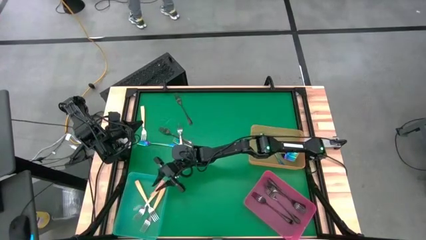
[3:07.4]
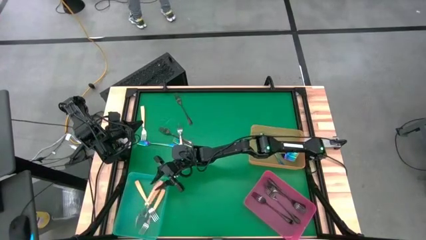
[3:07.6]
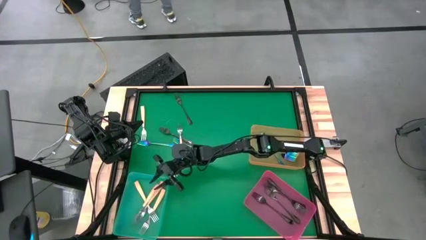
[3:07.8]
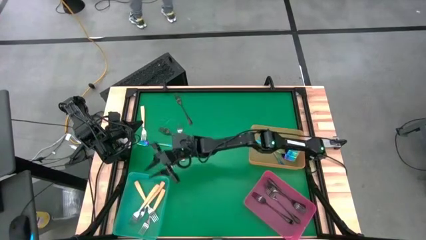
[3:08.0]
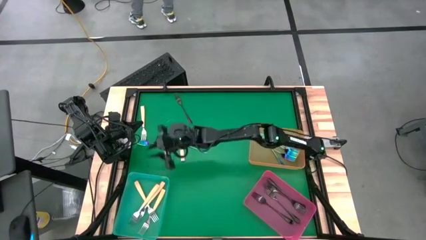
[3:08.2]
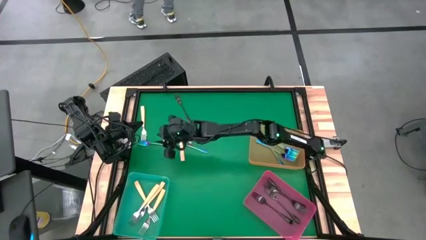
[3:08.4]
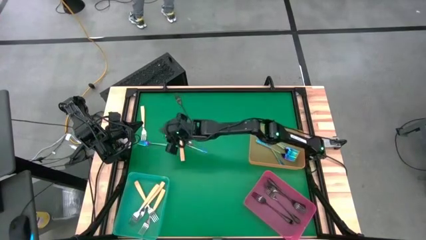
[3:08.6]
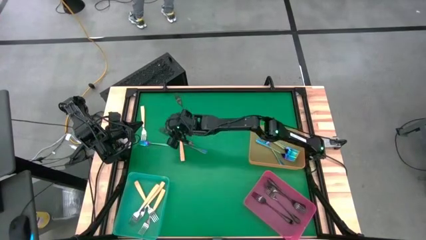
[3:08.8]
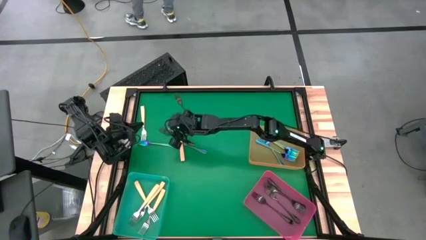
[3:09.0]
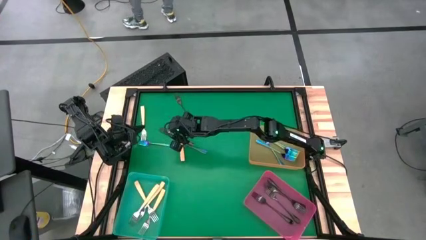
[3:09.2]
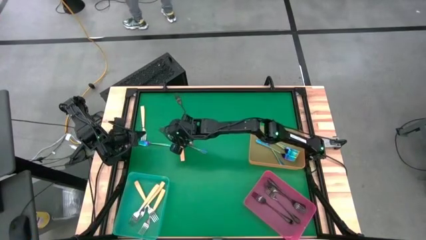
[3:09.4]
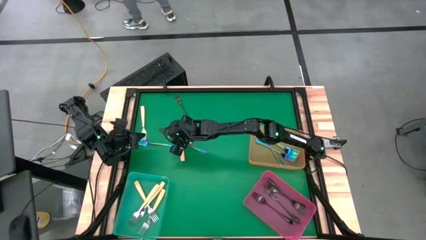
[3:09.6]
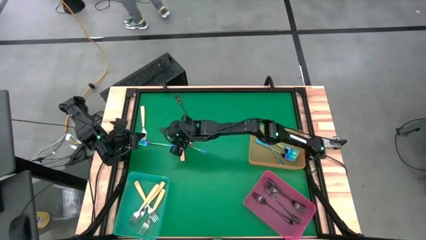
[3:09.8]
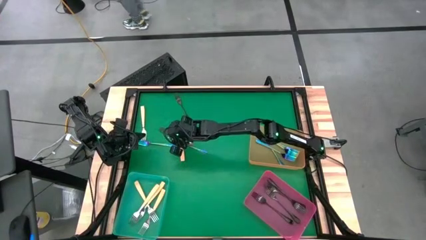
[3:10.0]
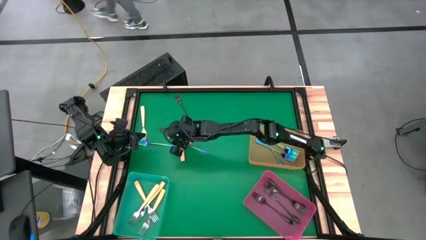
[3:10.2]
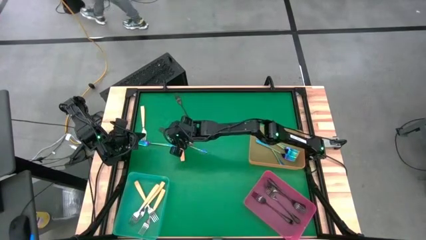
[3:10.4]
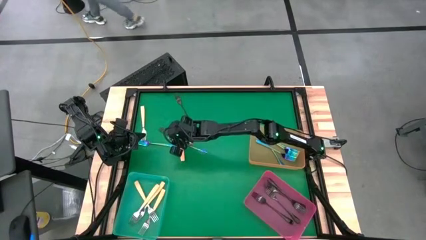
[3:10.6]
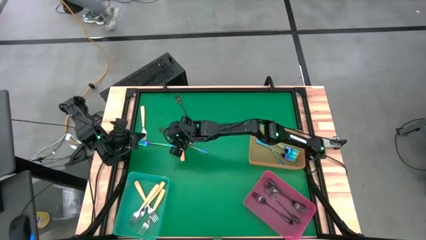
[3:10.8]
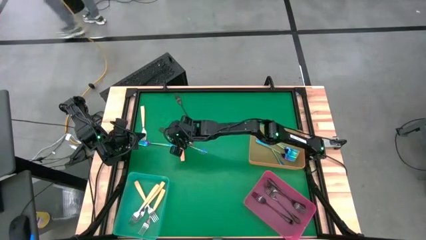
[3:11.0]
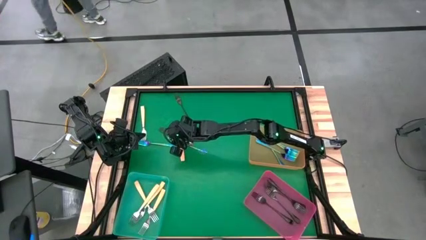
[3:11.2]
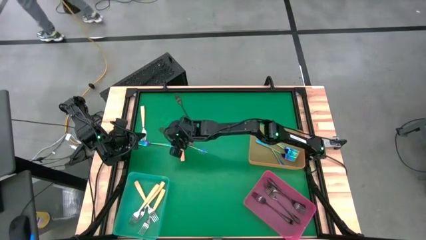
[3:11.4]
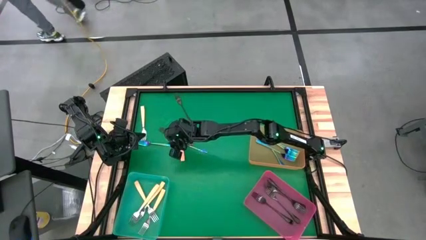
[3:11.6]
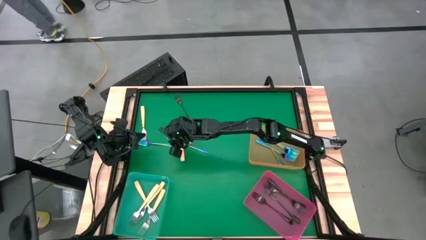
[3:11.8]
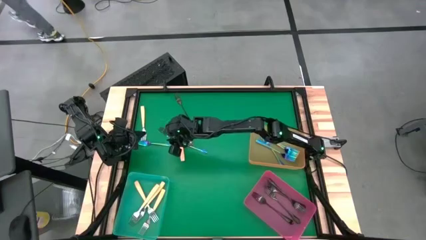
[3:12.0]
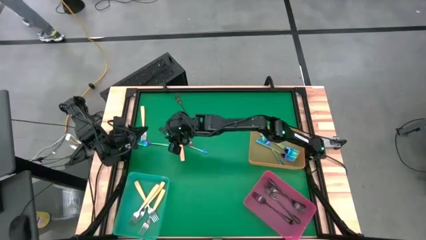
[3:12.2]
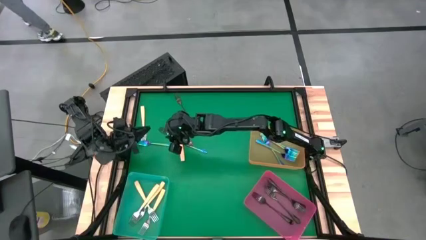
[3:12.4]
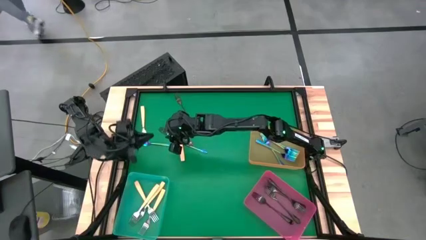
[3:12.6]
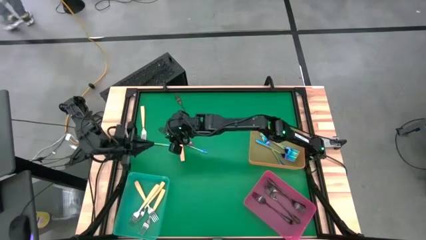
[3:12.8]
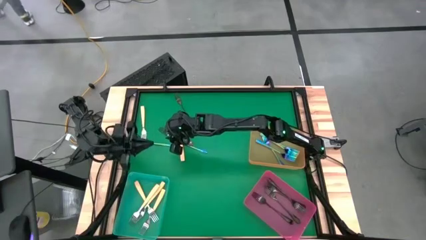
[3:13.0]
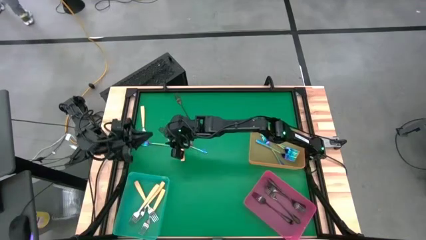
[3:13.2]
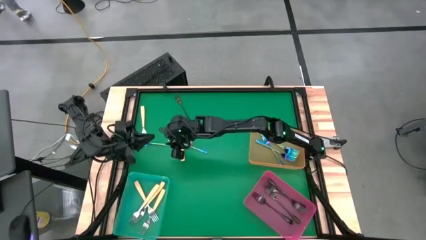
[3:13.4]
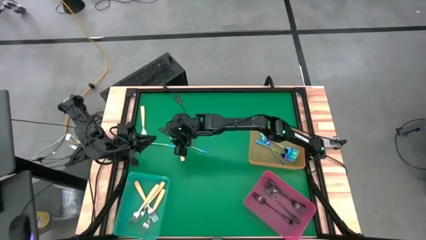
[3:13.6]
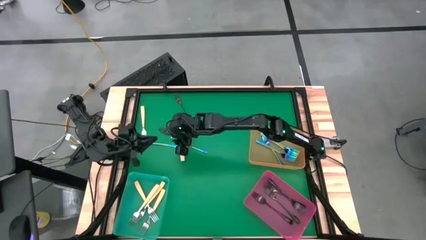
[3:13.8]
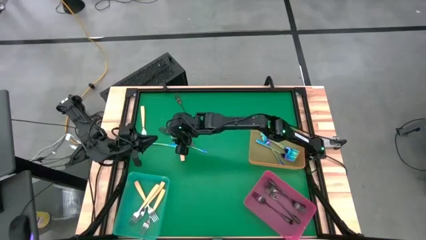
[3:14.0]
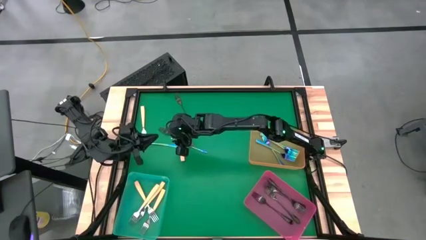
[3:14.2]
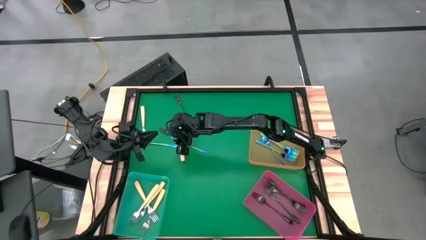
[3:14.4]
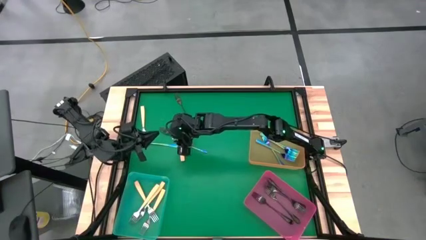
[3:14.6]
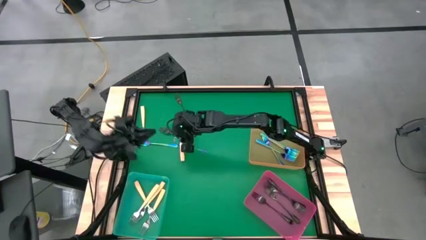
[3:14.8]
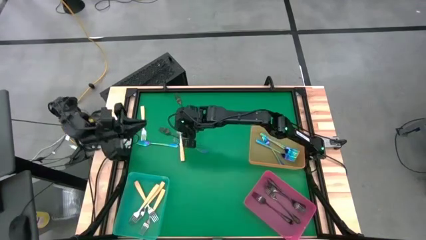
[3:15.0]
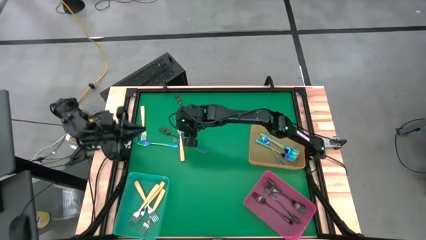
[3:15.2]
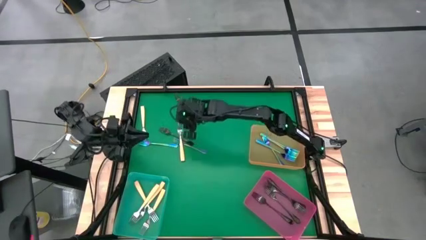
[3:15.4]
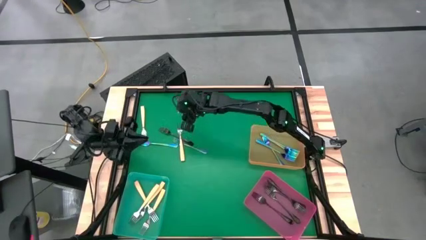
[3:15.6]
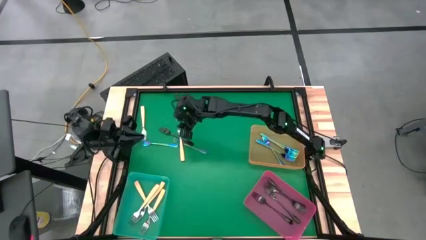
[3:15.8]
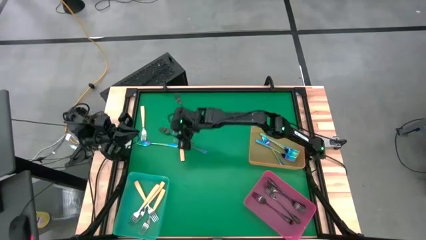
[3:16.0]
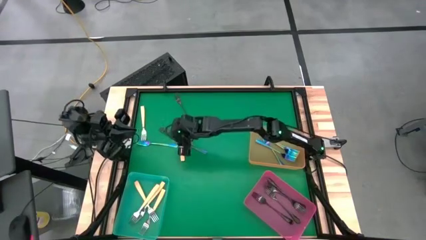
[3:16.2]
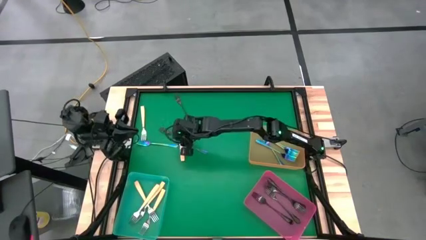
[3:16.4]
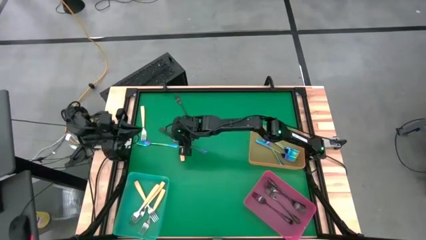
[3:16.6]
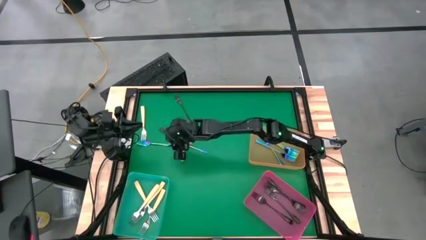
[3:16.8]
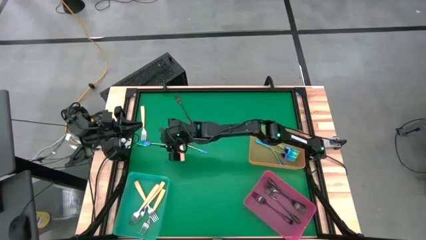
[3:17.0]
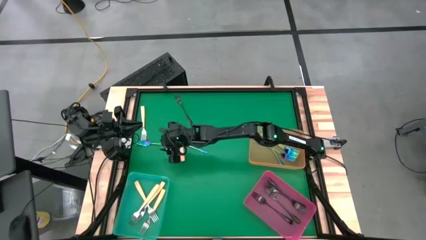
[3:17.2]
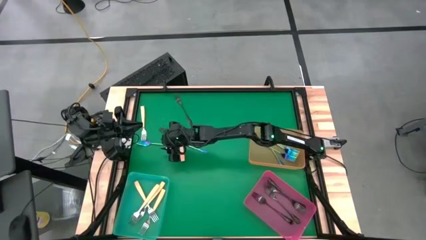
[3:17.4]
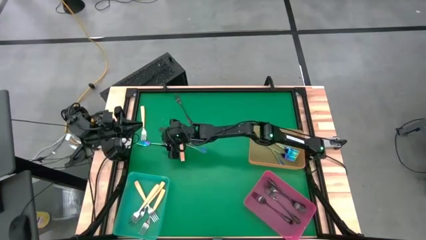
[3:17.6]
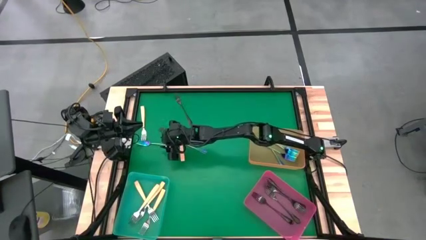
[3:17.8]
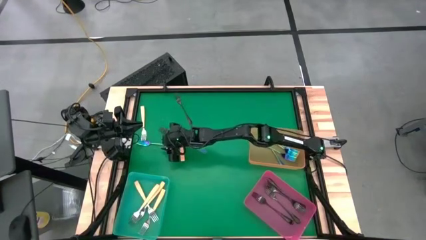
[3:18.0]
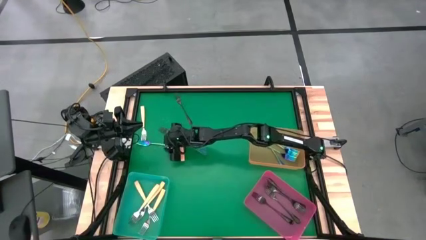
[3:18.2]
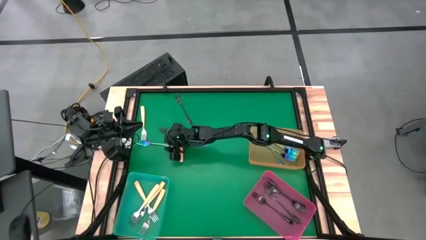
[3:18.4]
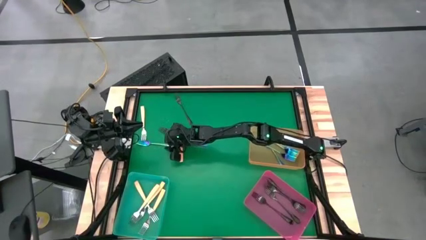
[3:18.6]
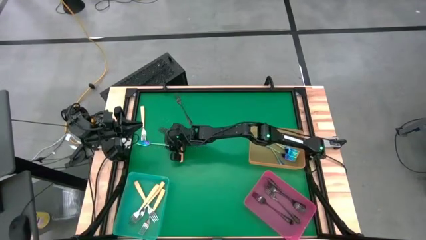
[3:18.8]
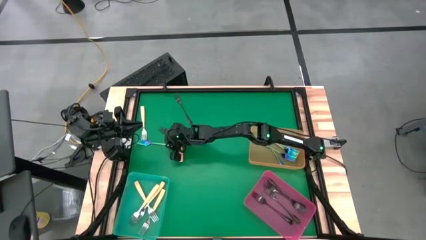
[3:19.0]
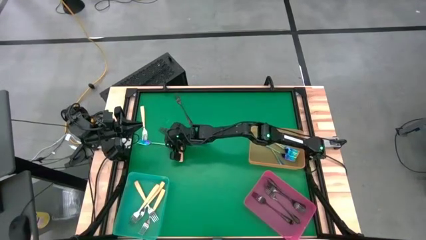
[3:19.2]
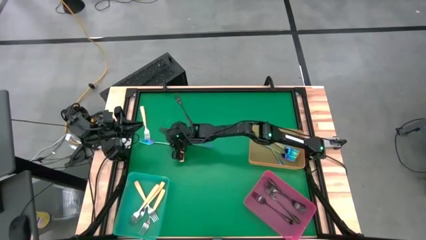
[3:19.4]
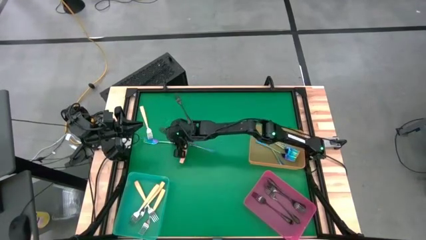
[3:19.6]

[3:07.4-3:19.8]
Task: Sort silverware by color (type)
Put the blue fork into the orange bin

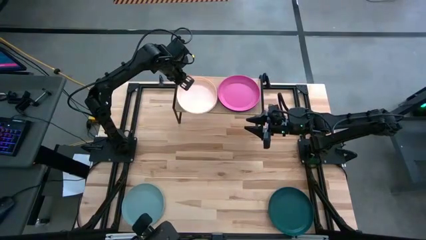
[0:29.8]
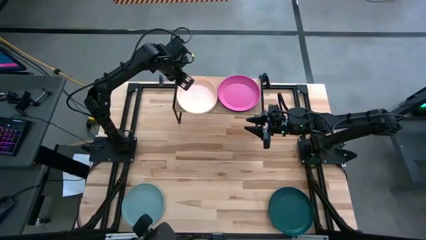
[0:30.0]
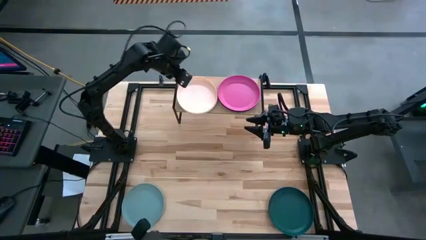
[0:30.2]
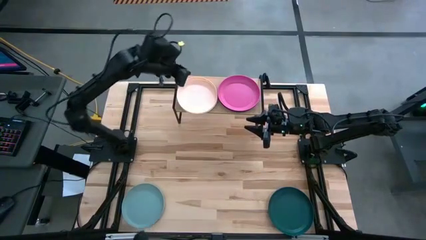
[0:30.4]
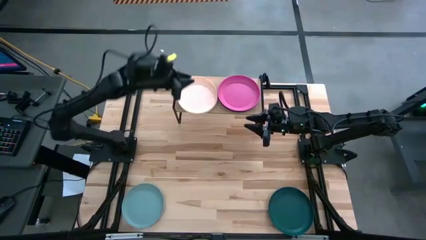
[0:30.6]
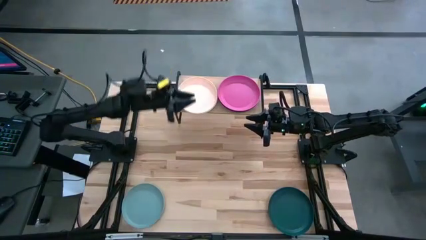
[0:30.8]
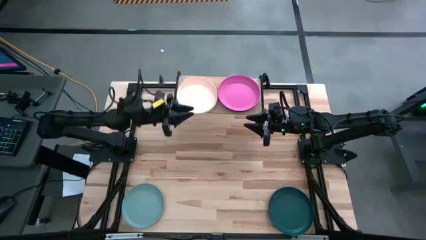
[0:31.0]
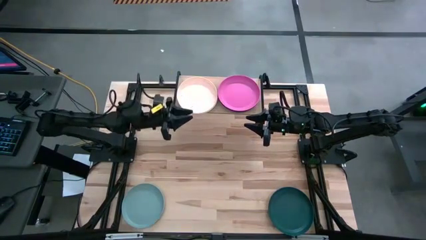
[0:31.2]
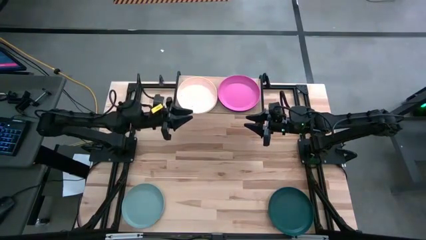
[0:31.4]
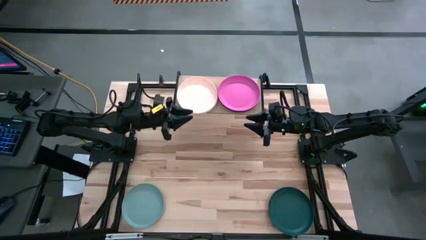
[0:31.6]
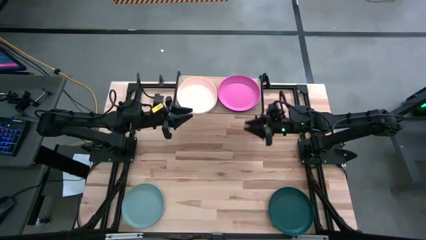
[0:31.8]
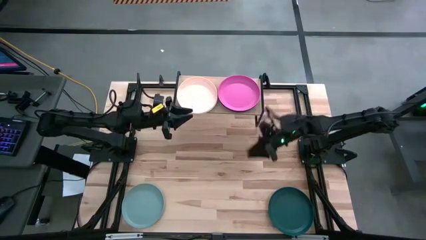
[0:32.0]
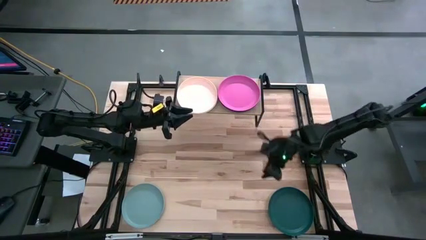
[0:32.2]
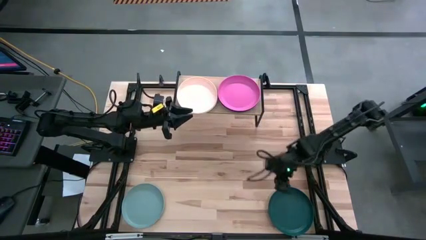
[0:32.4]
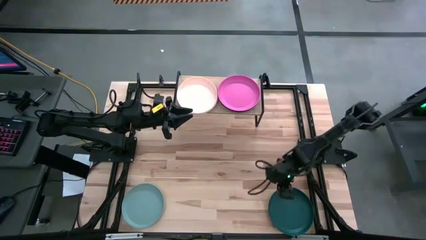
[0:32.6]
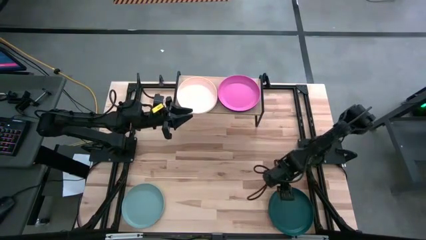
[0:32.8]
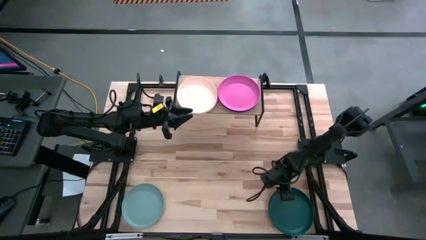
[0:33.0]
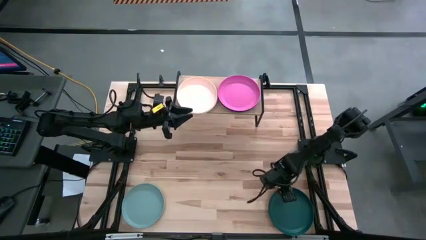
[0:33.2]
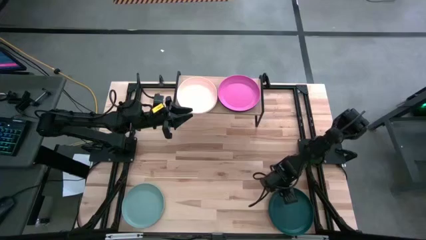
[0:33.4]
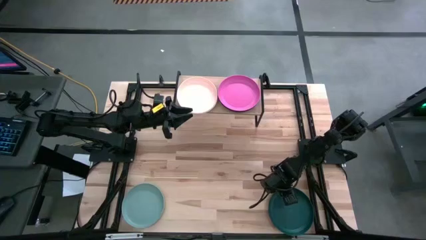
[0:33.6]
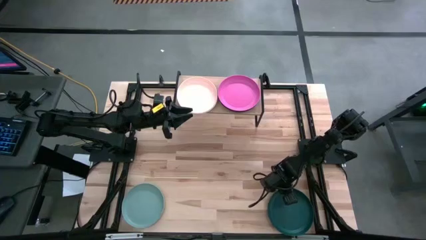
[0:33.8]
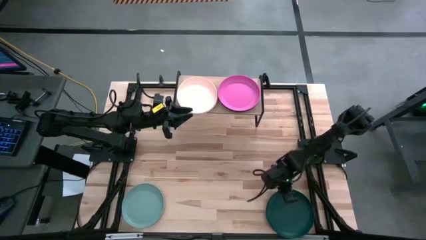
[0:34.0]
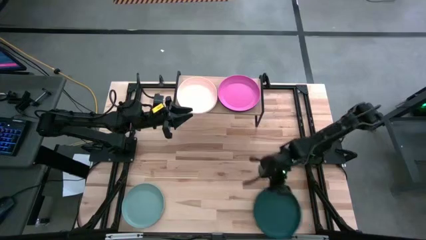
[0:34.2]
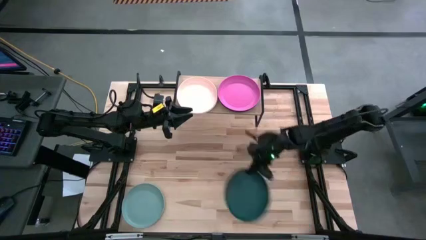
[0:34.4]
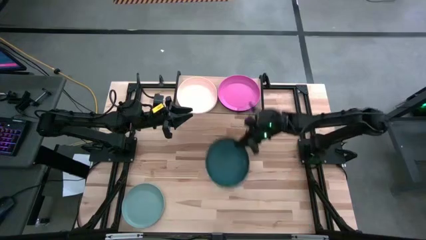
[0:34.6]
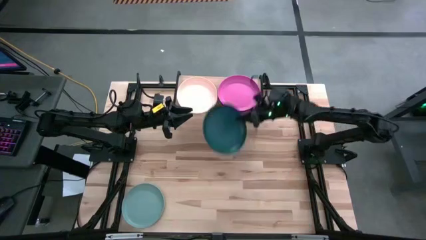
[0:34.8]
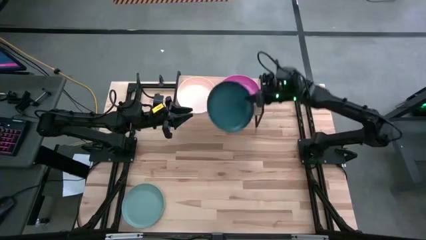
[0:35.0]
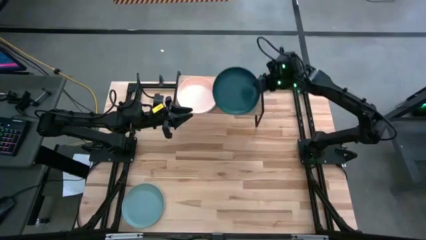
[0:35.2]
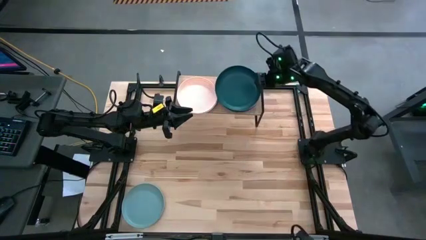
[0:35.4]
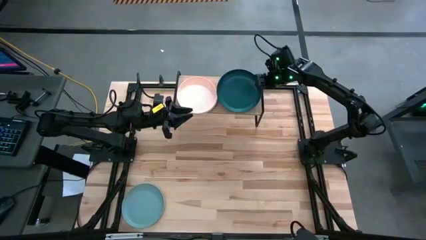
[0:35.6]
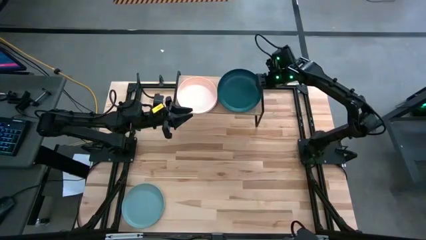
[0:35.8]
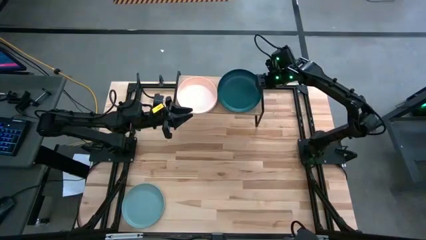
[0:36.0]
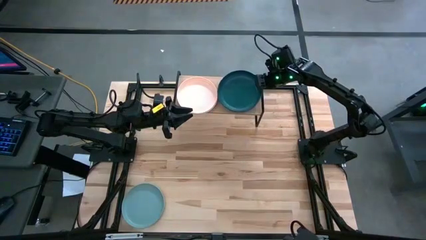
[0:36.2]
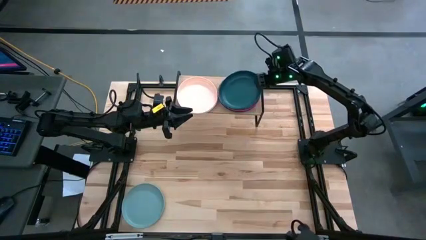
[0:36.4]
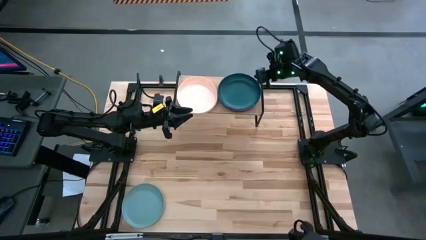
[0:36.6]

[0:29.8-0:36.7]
Task: Place and stack plates onto a shelf
Stack the green plate on top of the pink plate on the shelf
